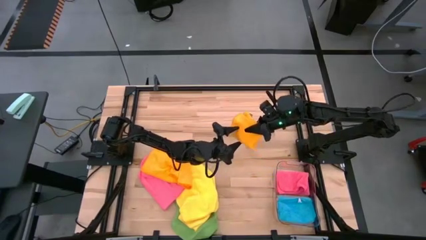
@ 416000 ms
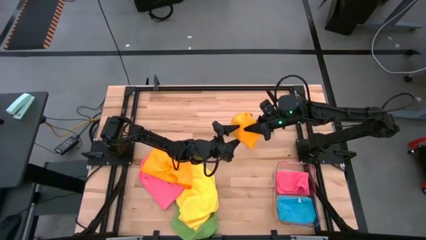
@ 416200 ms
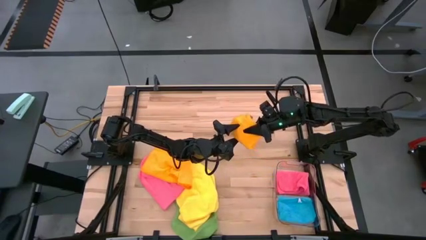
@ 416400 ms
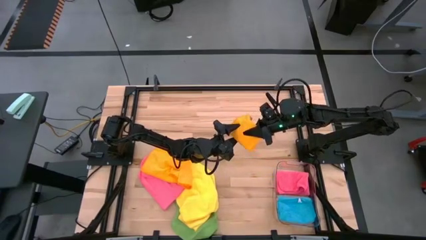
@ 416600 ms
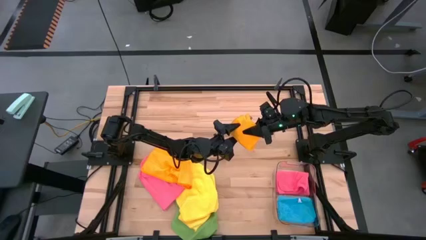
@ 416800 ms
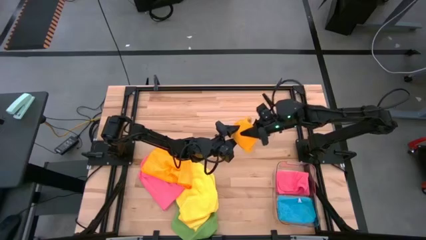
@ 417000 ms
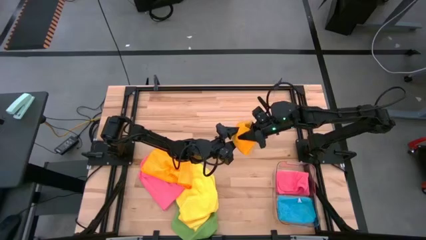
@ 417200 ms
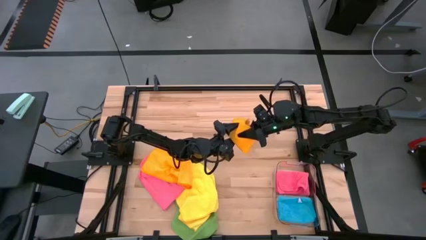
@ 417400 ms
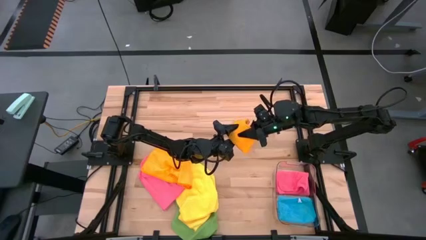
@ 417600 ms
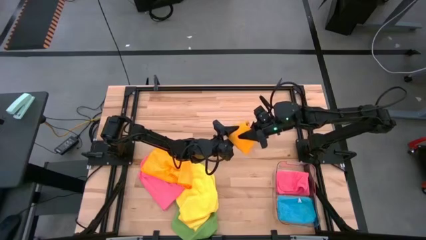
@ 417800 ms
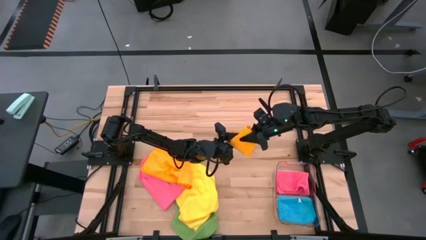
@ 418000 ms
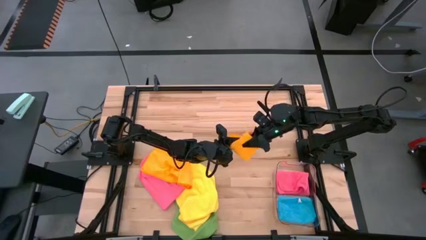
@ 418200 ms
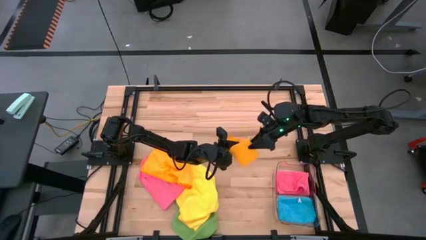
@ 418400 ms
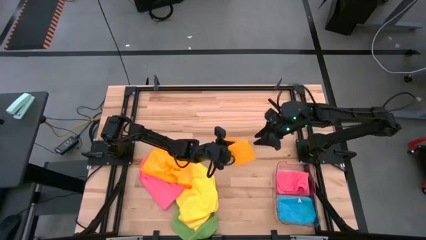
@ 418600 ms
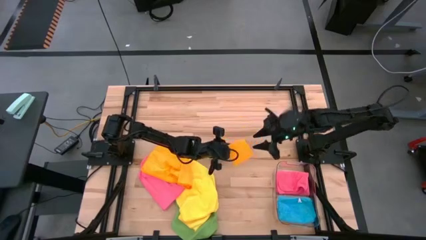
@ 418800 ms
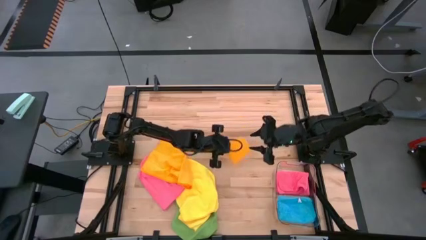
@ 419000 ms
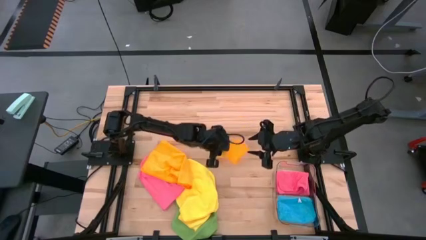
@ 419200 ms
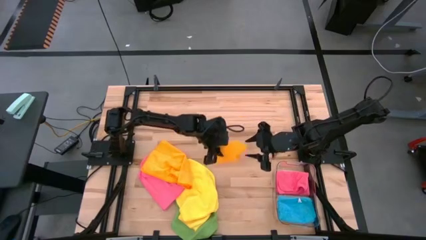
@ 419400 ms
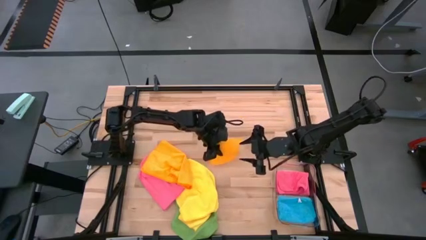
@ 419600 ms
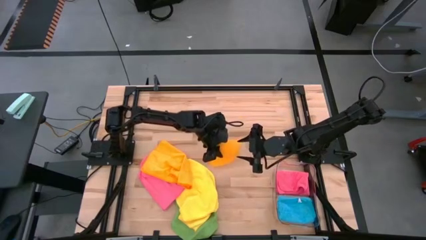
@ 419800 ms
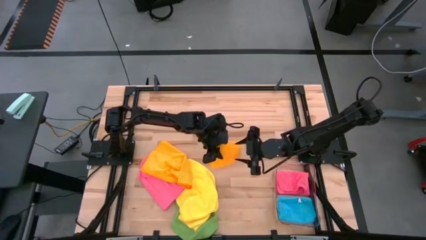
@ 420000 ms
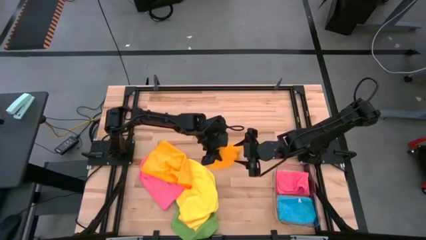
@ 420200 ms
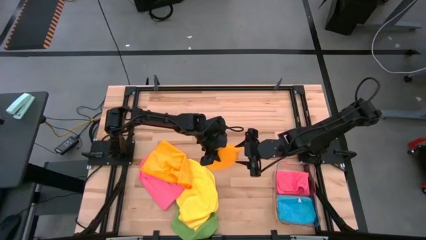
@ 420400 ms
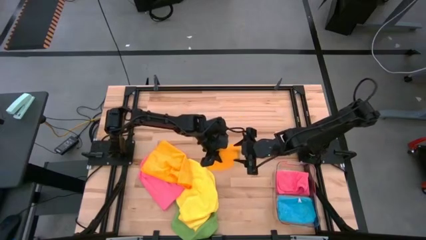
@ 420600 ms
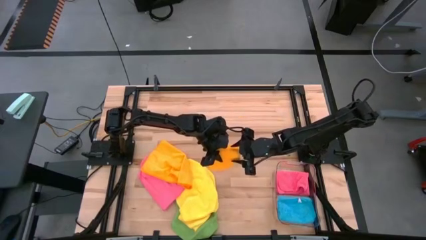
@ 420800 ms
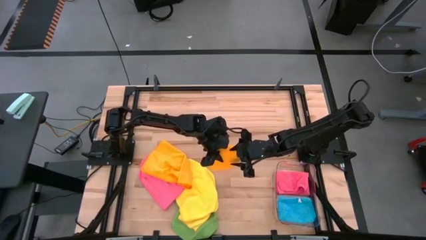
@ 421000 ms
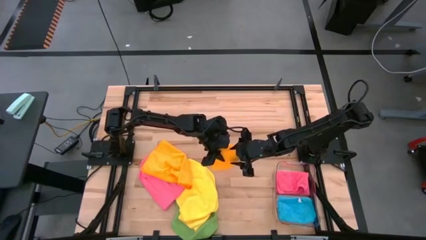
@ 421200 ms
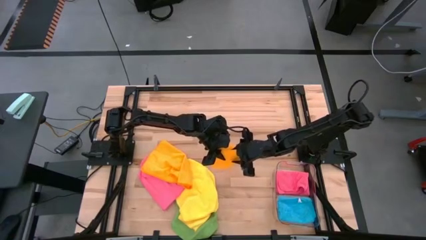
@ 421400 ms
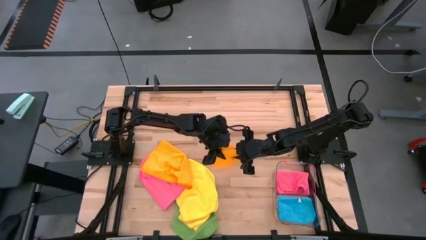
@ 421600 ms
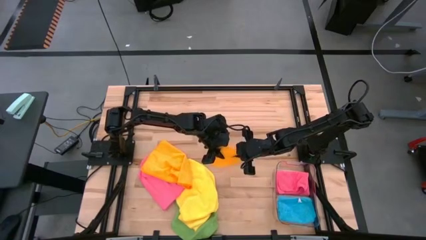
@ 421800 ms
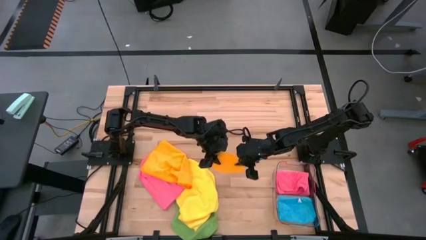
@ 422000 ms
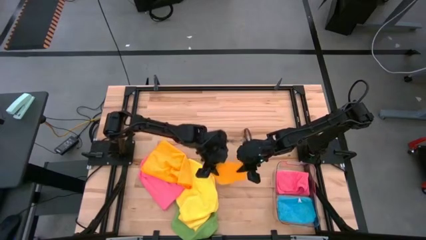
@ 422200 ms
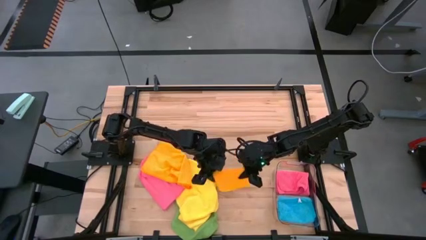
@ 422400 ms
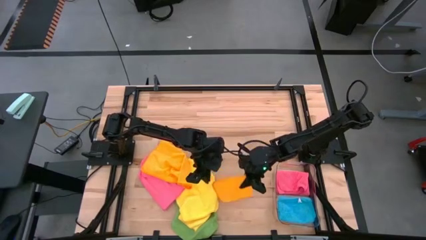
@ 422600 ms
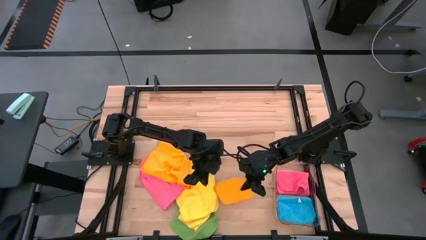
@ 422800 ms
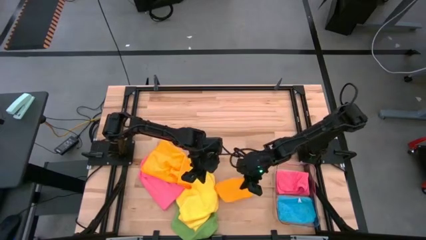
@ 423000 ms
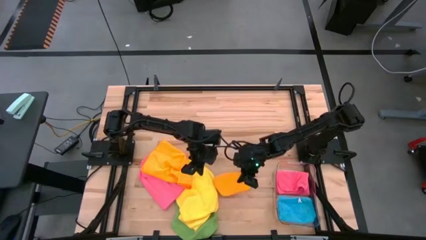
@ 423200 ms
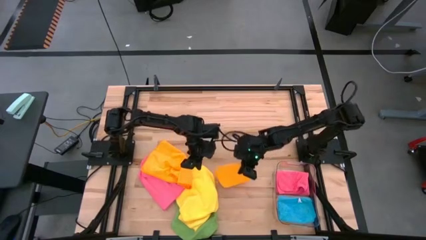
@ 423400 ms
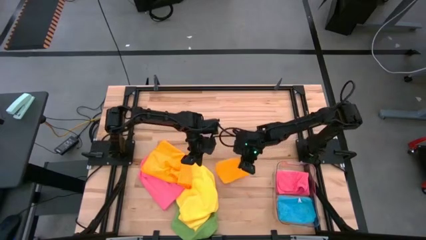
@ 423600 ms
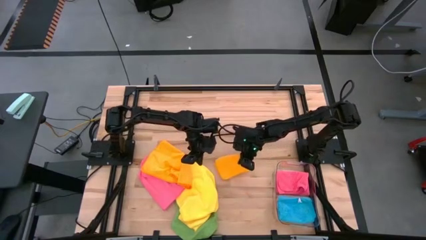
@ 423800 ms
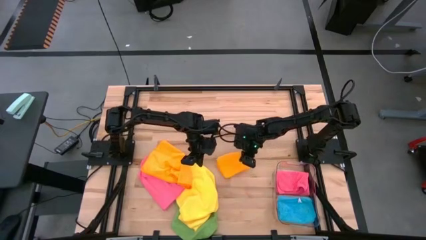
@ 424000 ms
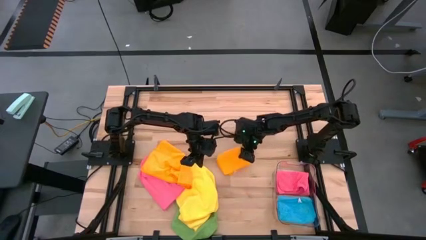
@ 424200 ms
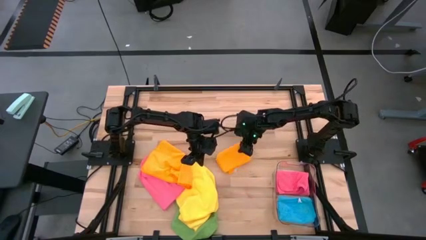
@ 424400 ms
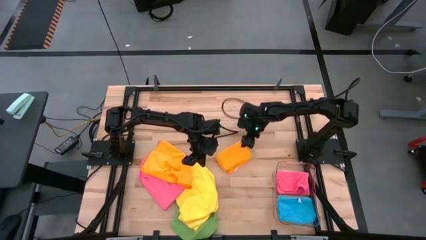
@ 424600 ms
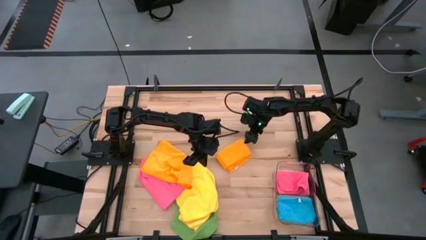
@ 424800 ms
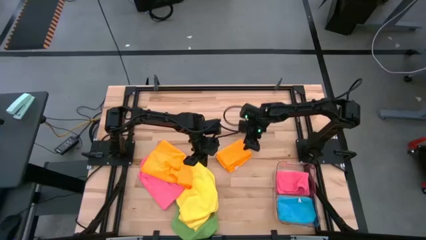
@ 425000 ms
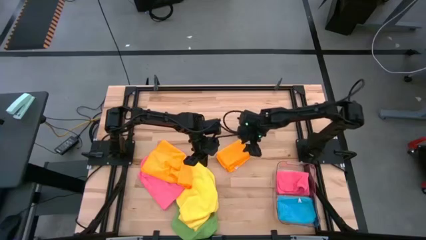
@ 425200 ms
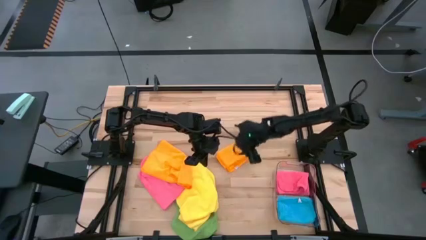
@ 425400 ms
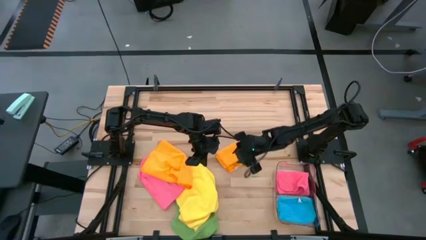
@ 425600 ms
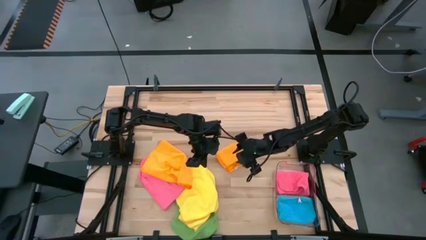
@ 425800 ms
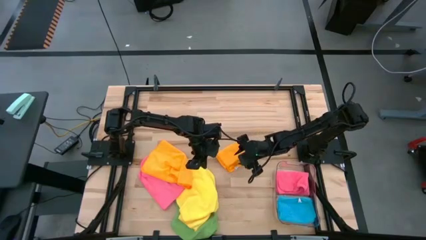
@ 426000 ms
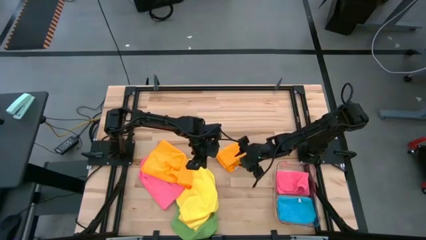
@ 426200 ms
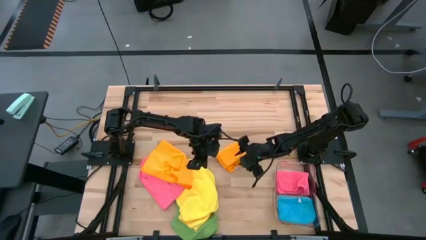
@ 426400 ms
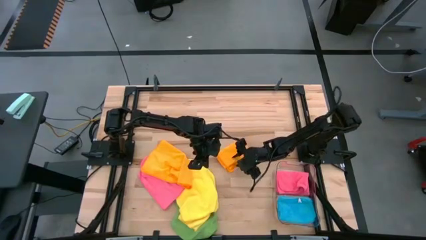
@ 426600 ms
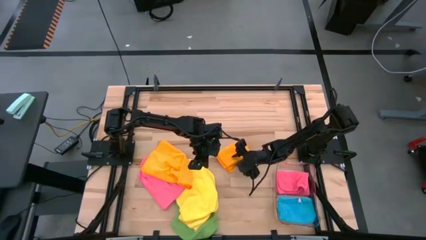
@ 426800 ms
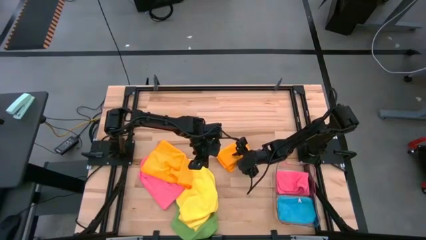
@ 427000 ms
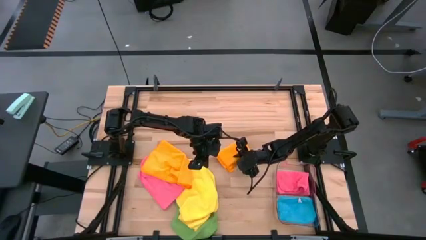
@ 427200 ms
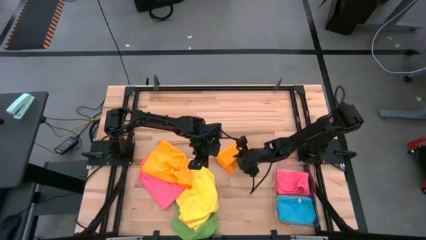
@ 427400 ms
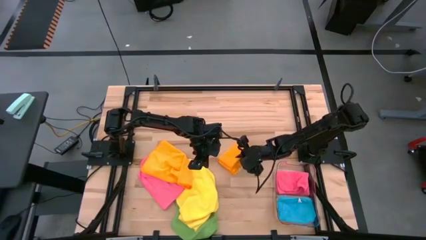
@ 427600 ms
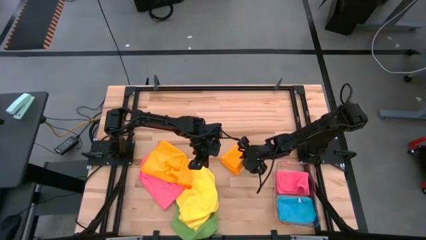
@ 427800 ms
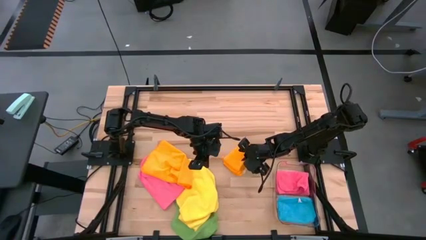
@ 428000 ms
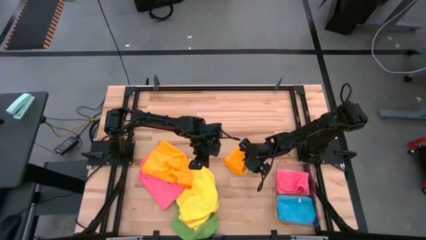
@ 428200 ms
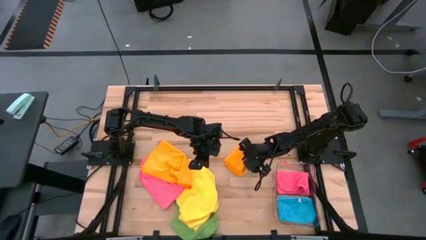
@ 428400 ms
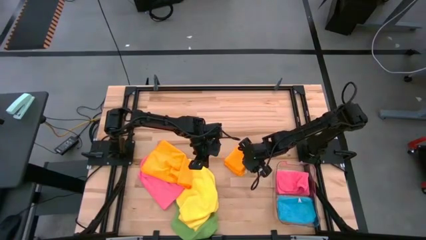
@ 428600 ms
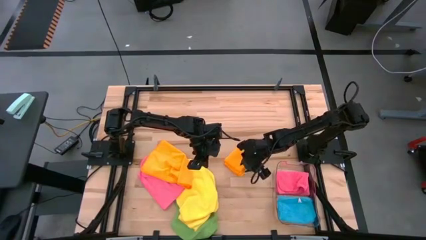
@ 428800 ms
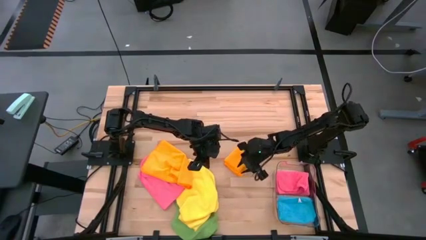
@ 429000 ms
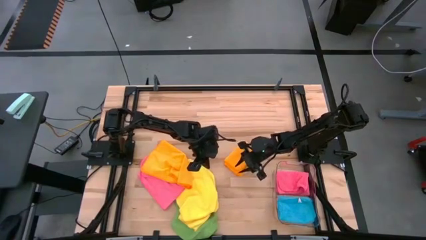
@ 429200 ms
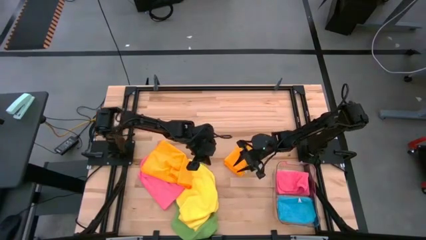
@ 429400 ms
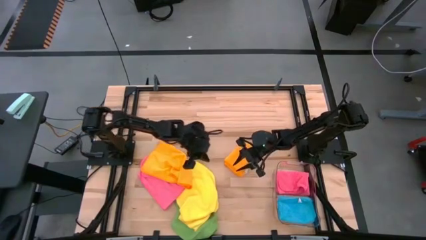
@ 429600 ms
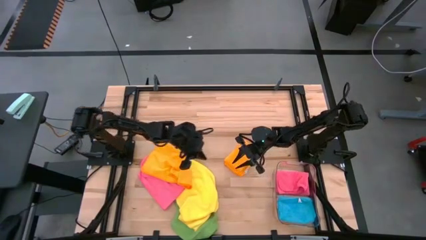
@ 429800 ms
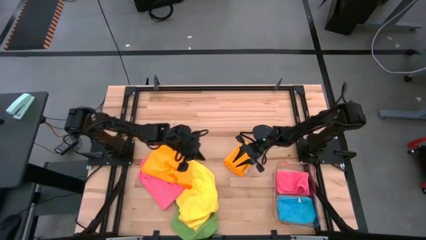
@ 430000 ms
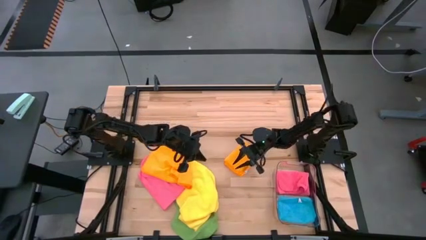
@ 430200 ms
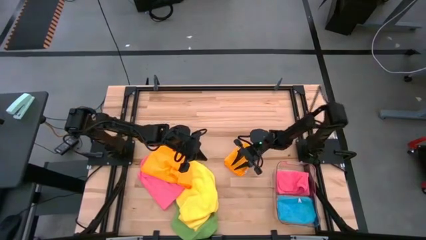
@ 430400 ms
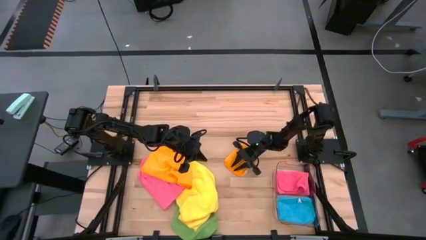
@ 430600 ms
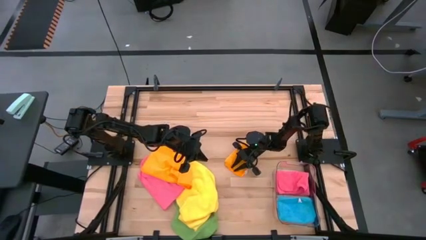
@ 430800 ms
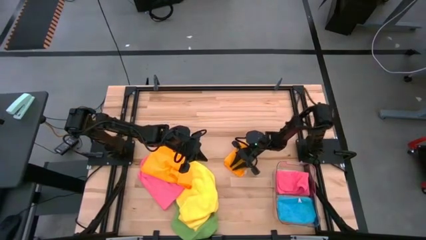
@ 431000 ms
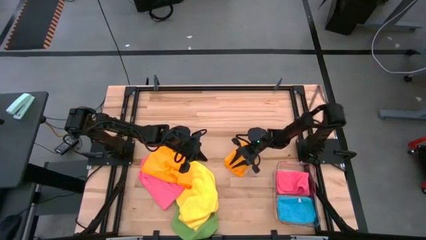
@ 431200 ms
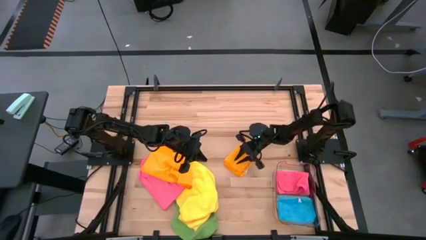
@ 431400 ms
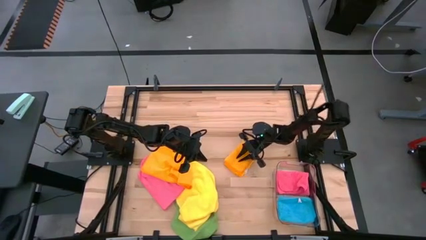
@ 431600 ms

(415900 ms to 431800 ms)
Task: Fold microfiber towels
Fold the orange towel
